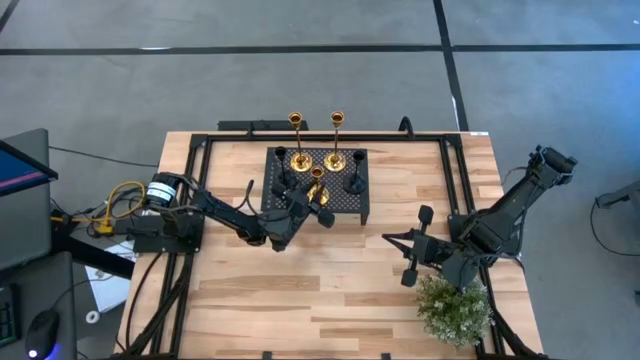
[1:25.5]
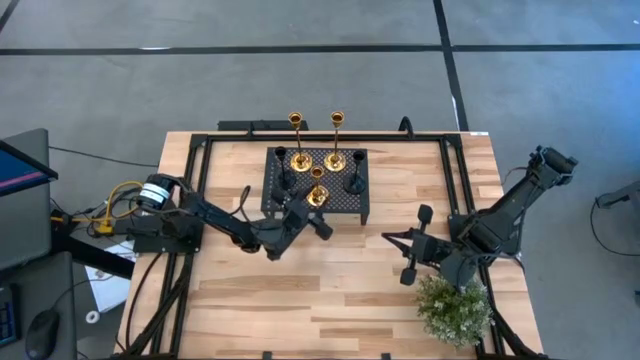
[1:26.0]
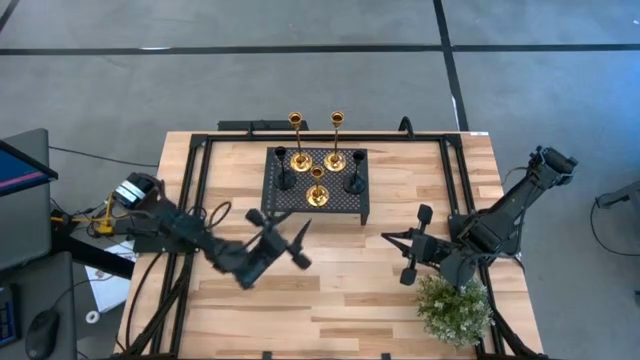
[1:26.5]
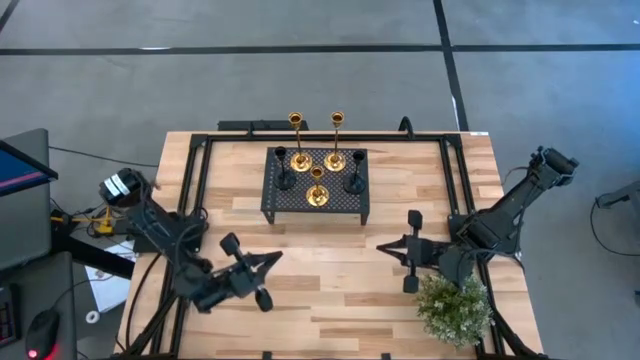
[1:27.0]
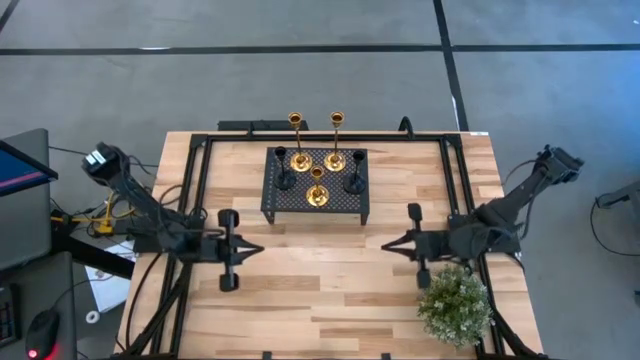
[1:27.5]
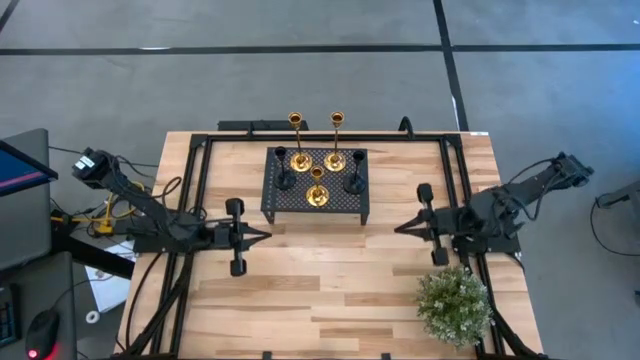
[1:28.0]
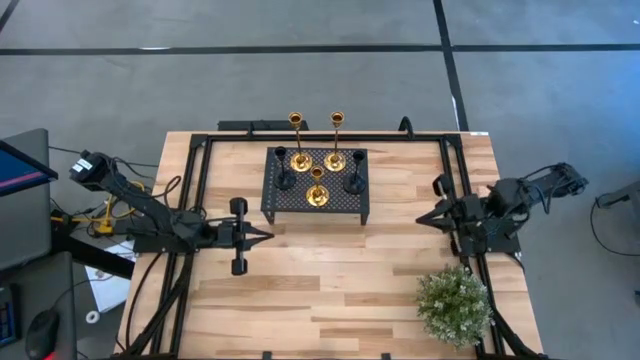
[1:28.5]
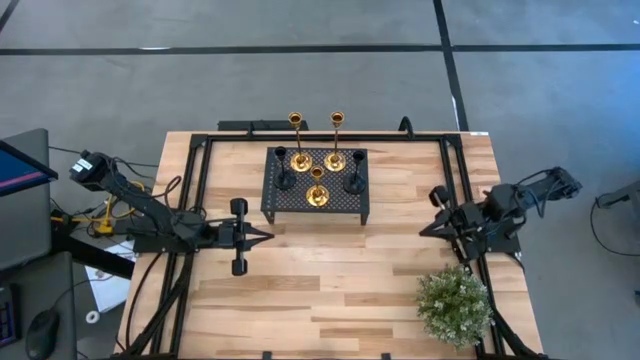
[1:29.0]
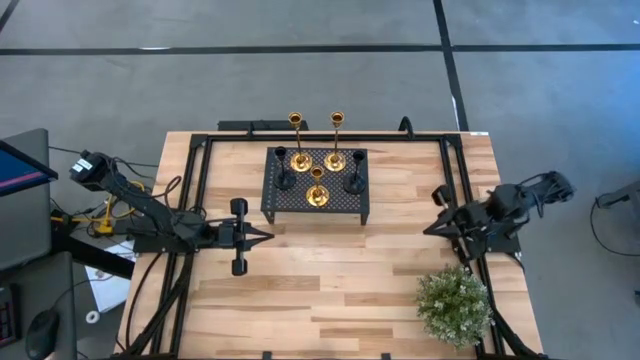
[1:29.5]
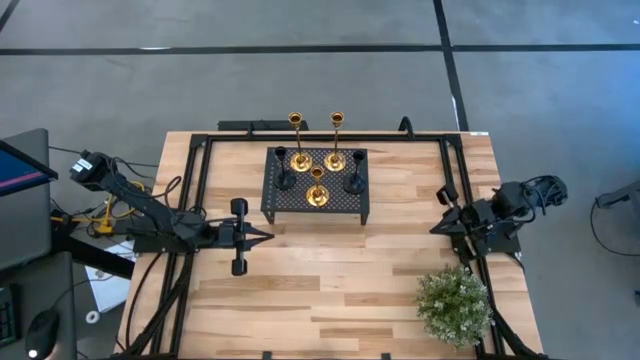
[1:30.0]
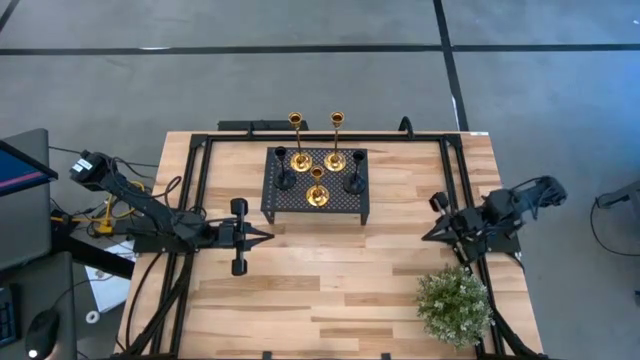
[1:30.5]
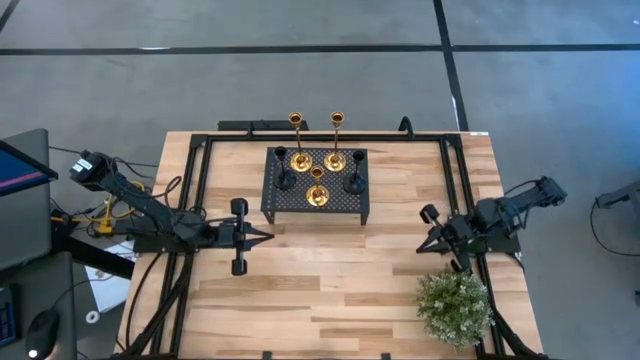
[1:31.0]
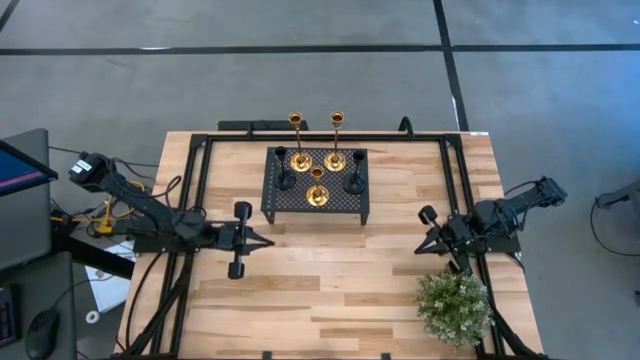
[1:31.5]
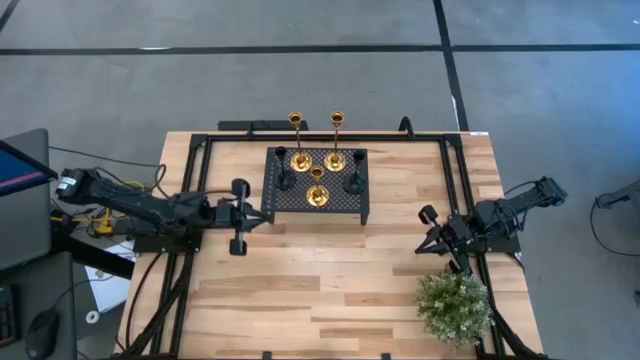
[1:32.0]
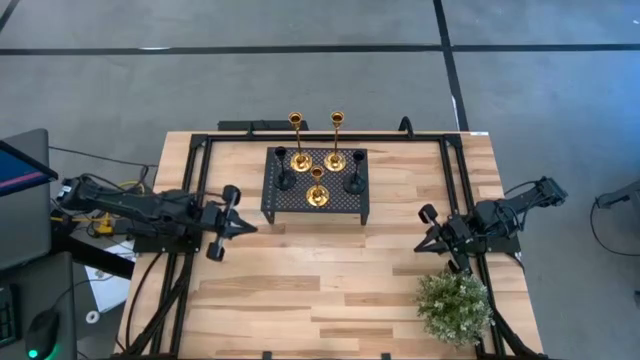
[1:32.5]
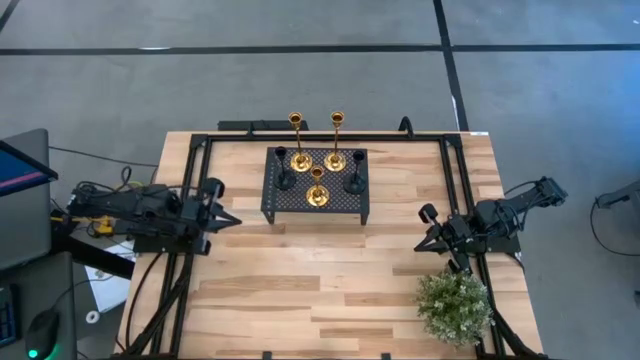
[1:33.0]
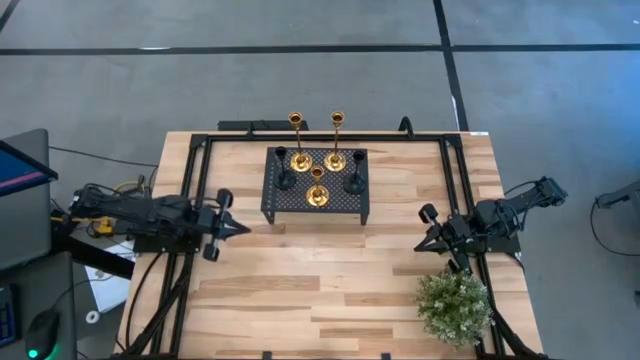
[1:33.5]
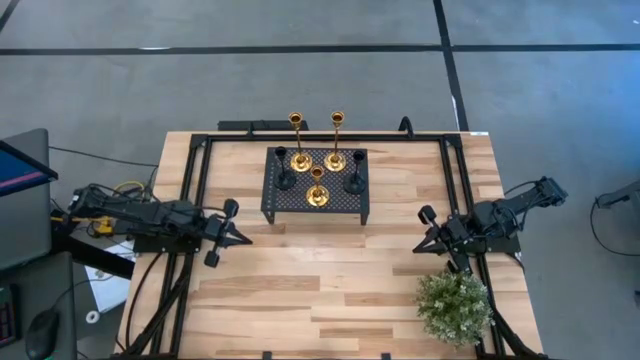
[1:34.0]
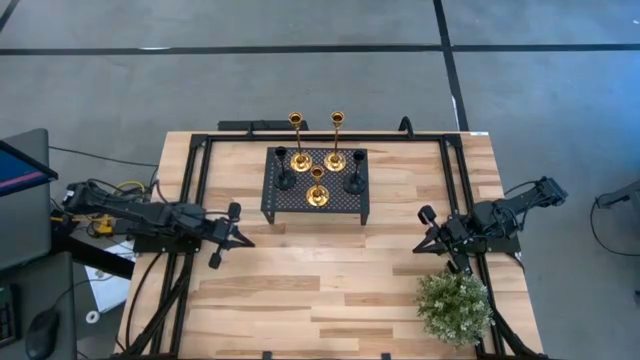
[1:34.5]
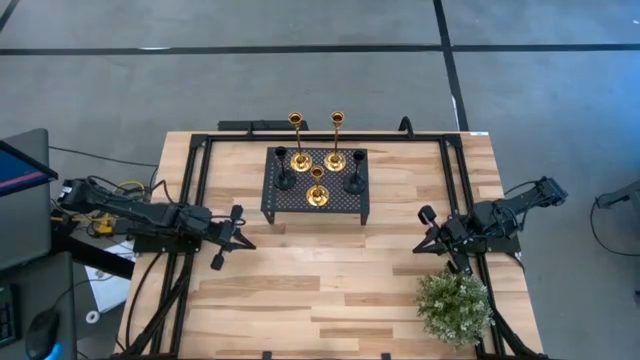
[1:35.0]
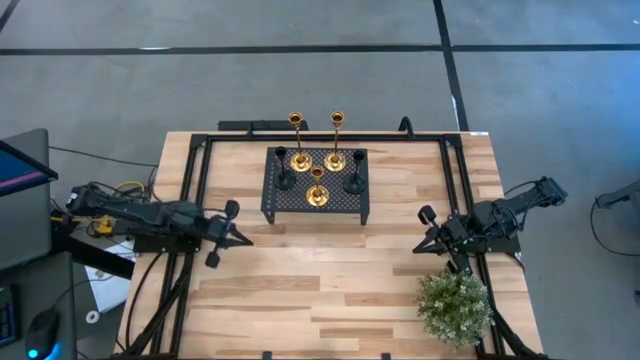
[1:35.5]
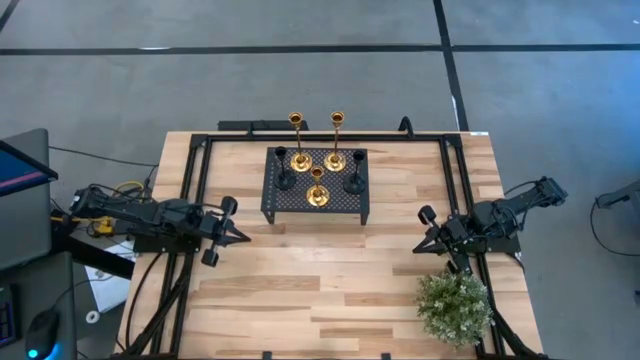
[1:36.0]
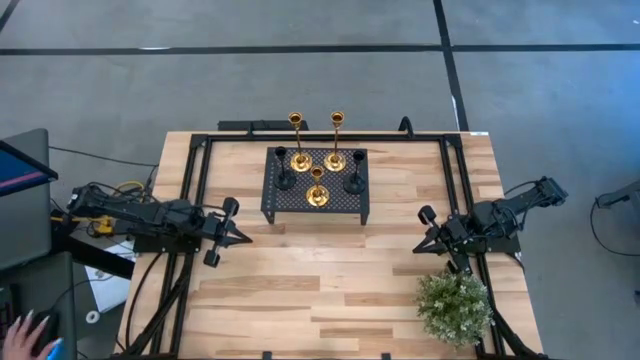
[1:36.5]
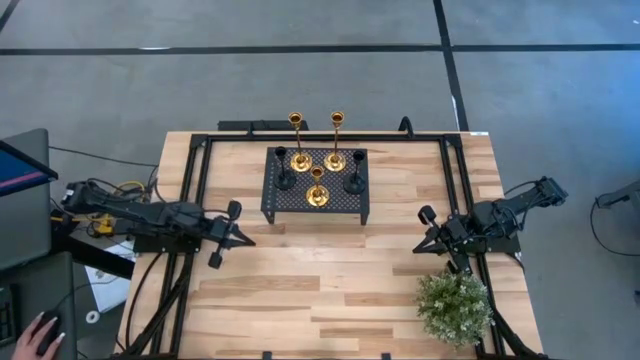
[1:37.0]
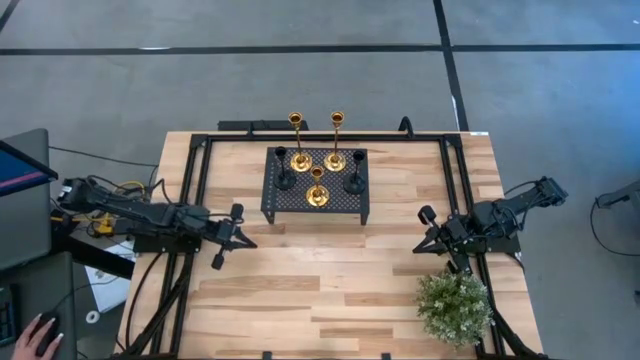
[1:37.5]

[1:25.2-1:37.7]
Task: Pick & Place candle stick holders
Return to Home Position

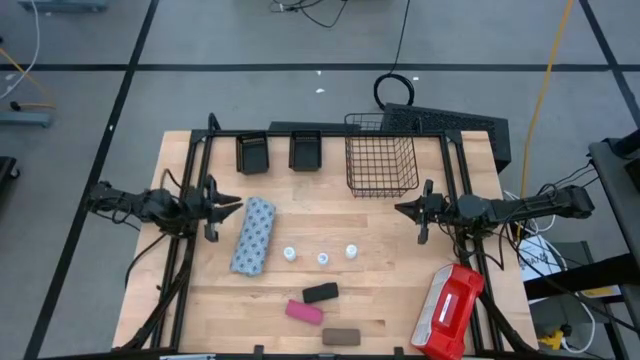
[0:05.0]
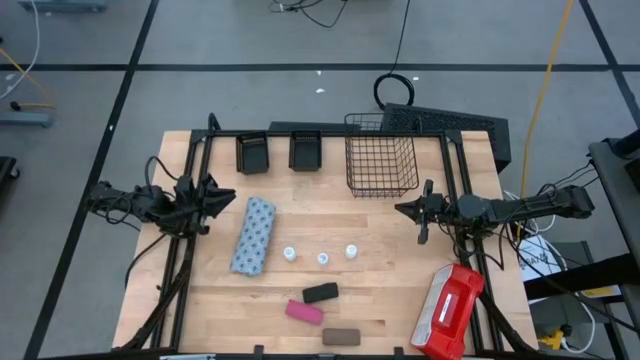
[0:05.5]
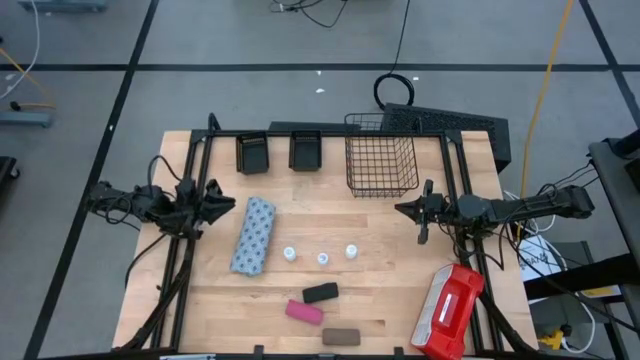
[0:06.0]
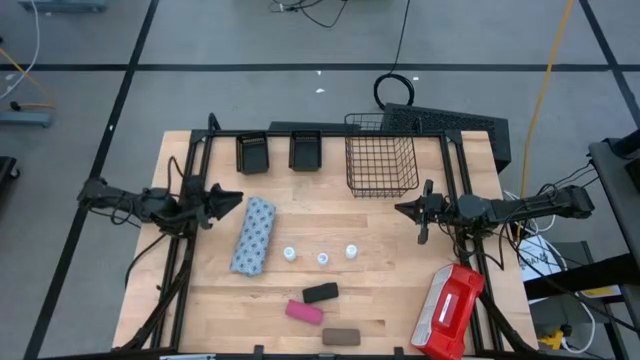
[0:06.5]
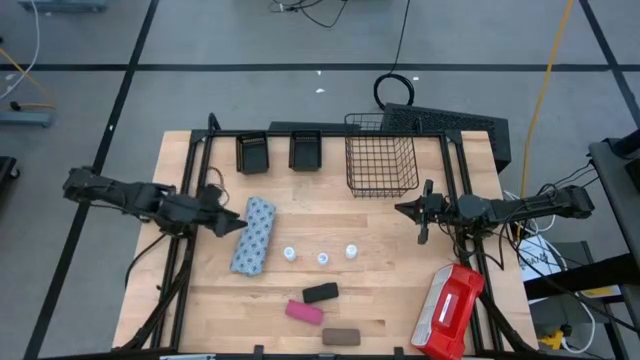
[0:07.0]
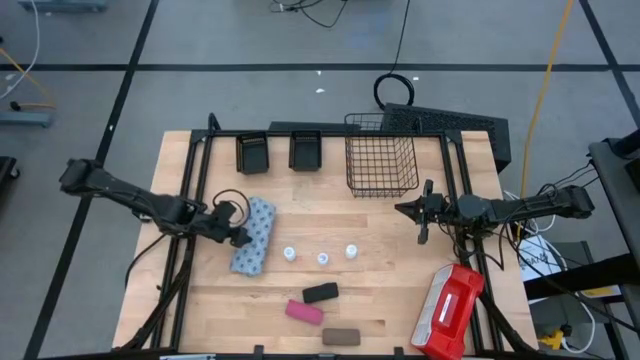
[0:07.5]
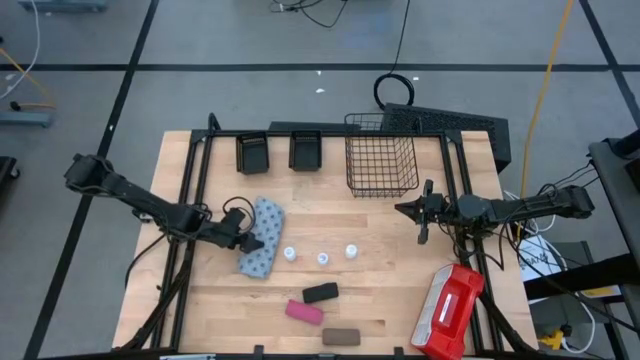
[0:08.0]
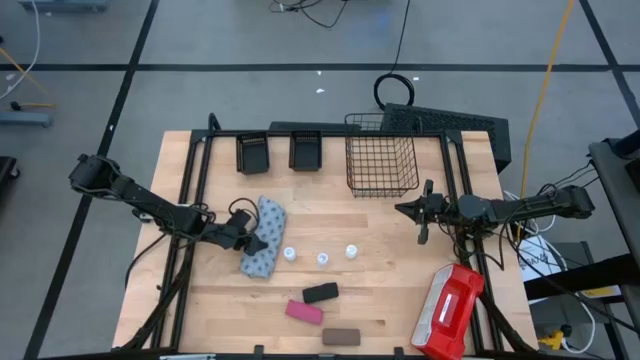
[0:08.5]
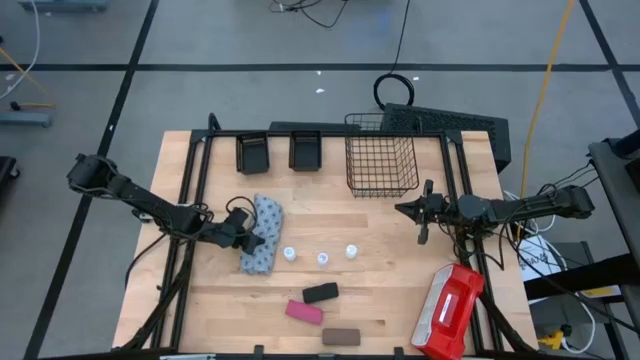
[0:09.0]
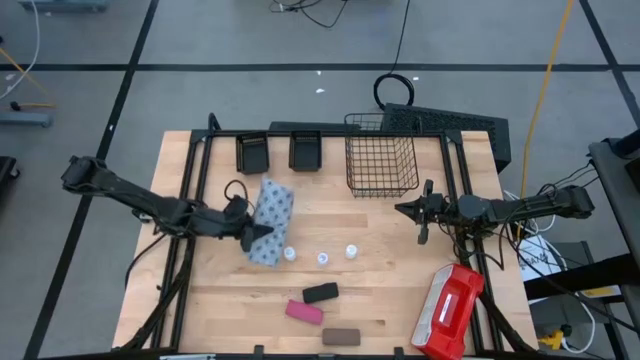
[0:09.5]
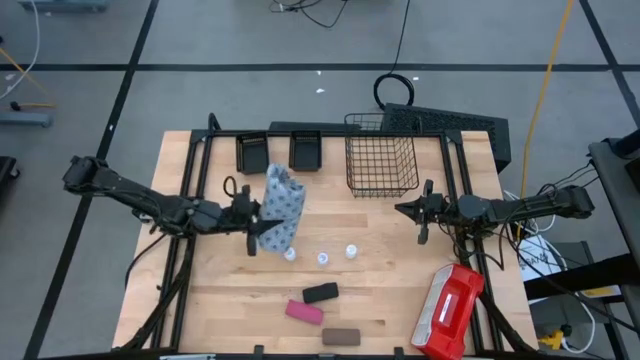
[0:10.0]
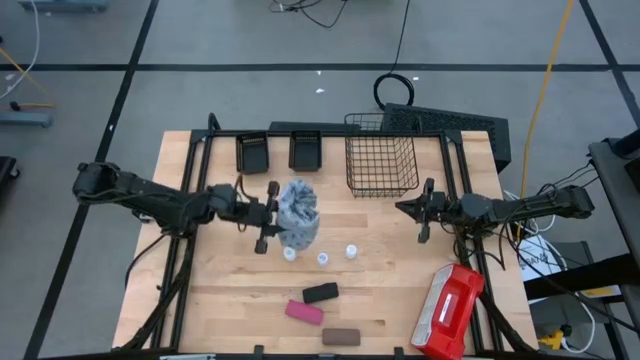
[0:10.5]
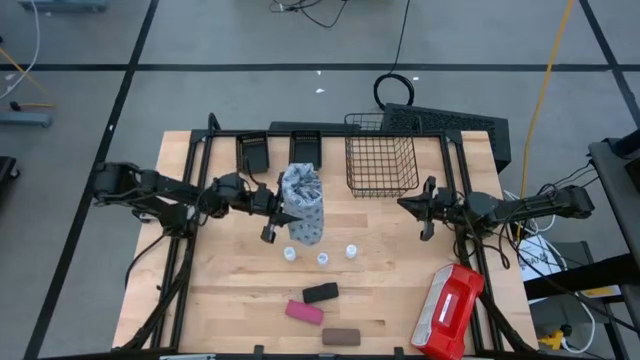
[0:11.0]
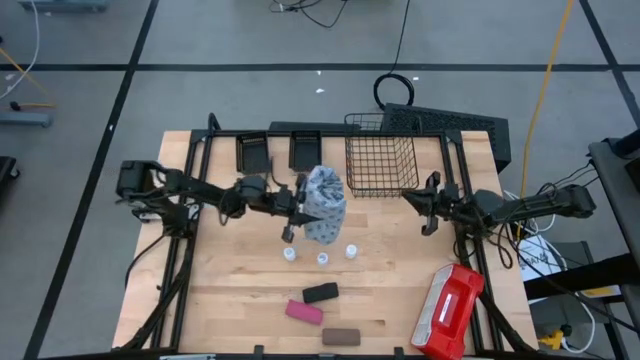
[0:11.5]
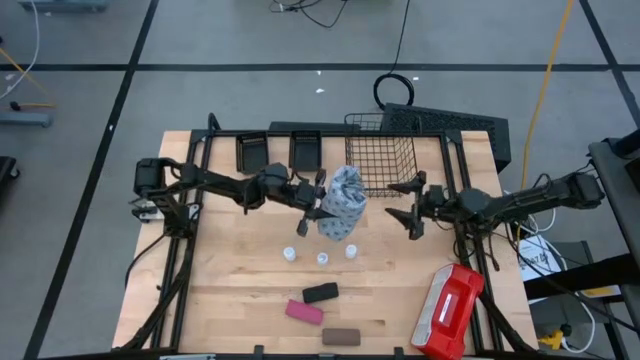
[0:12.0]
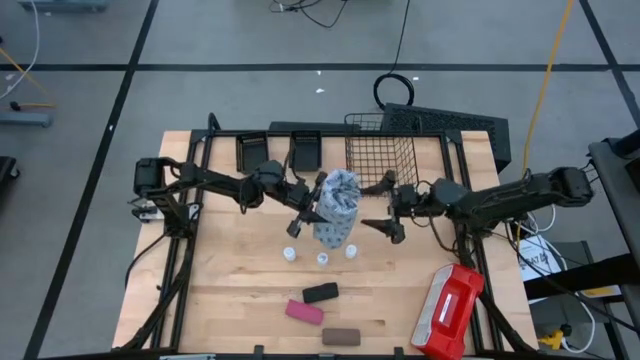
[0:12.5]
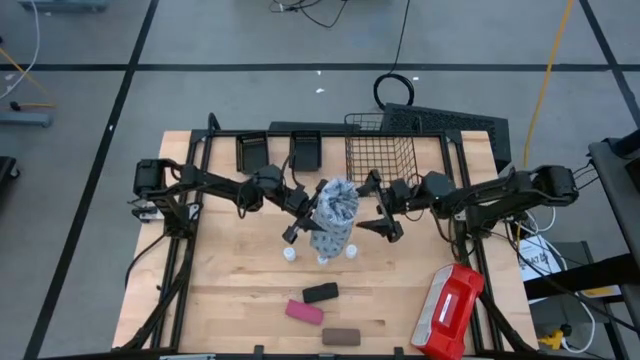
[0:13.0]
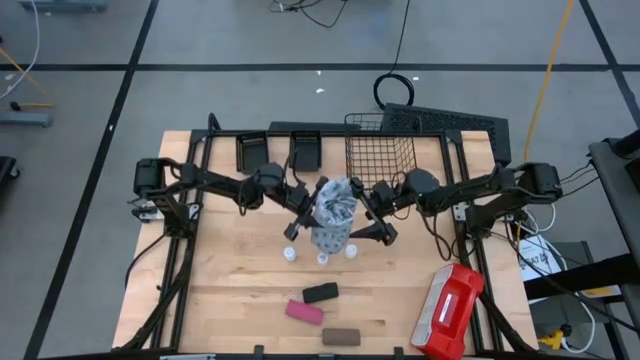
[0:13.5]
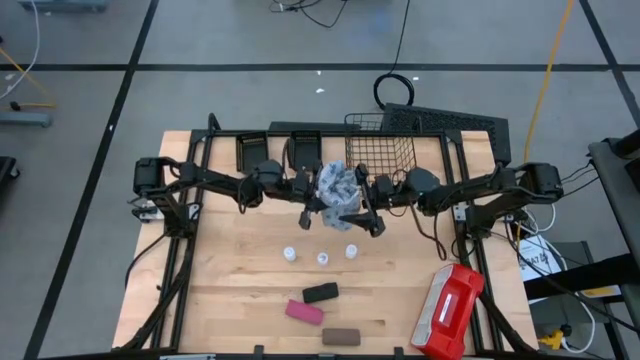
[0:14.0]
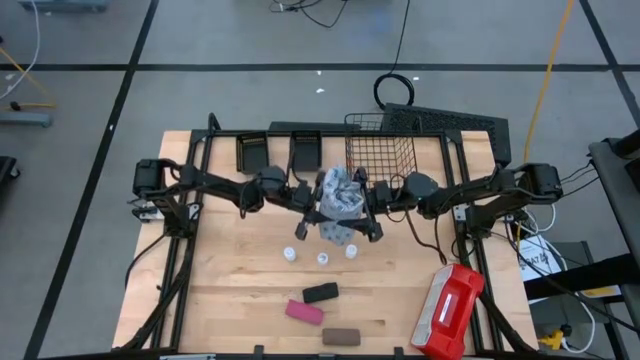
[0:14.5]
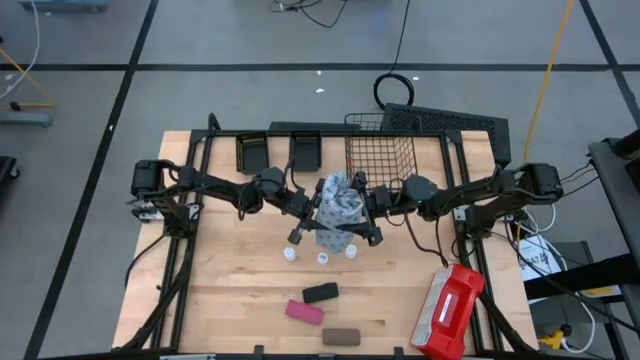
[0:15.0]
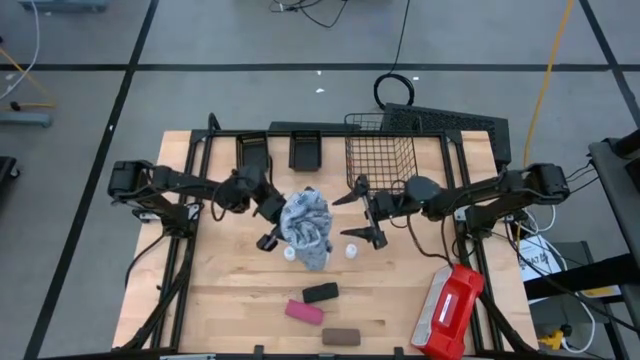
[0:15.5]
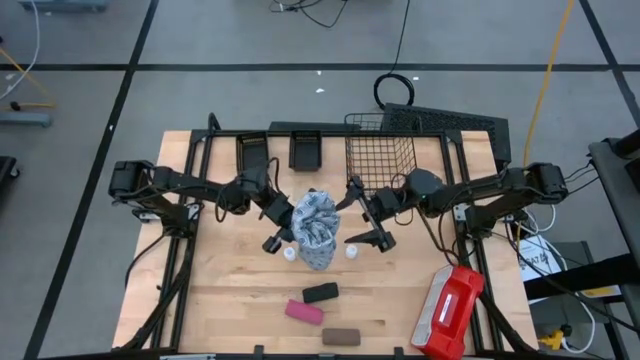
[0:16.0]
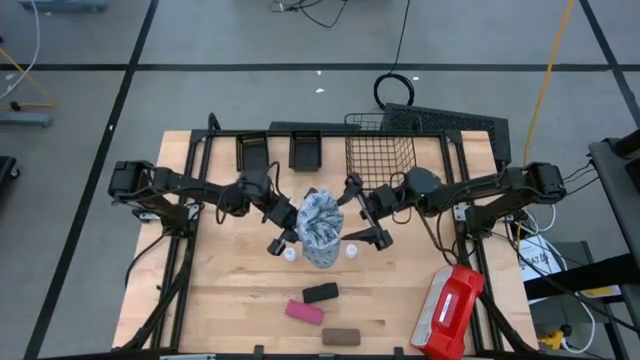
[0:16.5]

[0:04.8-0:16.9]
Task: Pick & place medical supplies in basket/bin
Put the gray patient gown into the black wire basket
